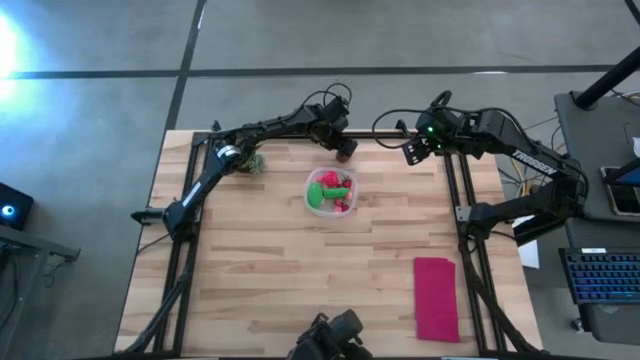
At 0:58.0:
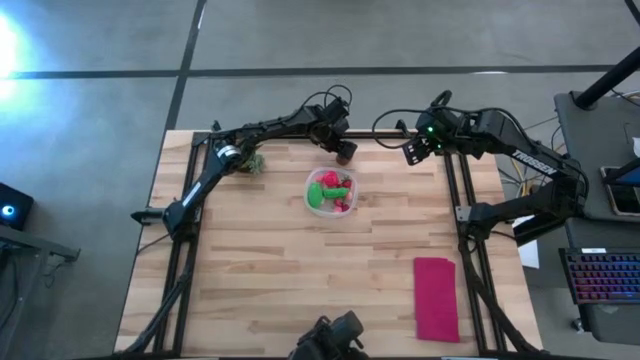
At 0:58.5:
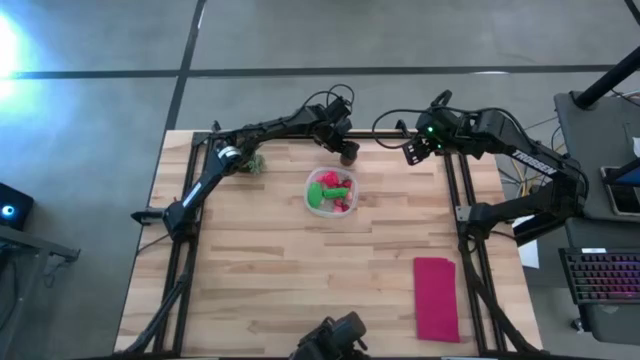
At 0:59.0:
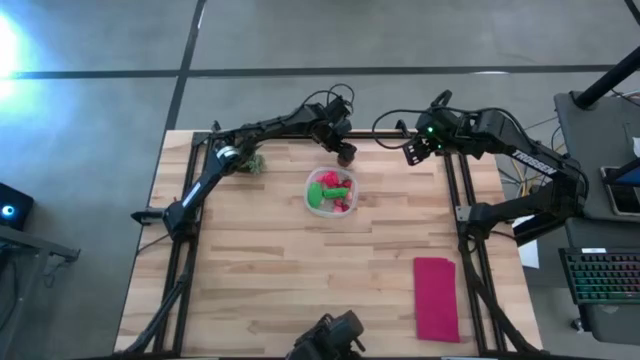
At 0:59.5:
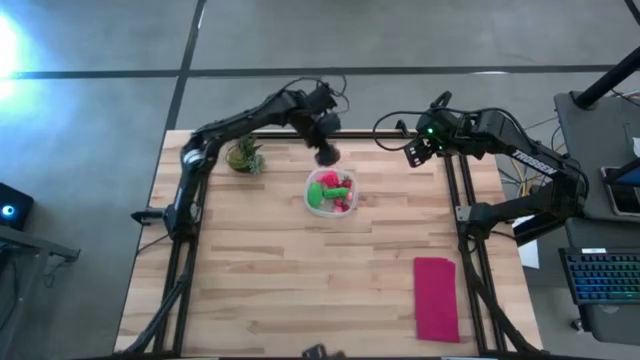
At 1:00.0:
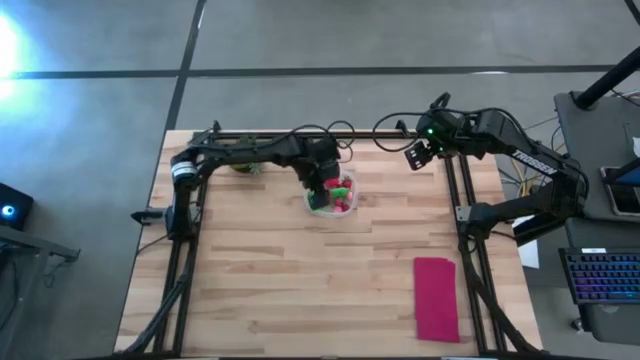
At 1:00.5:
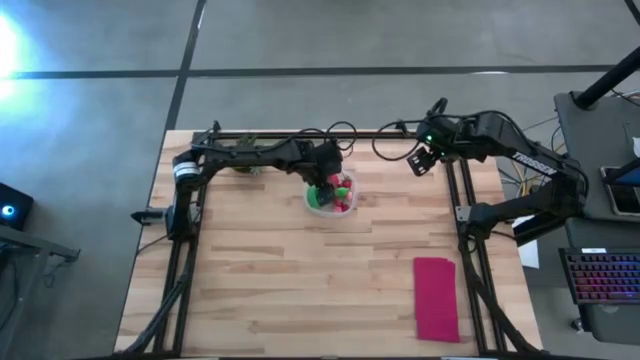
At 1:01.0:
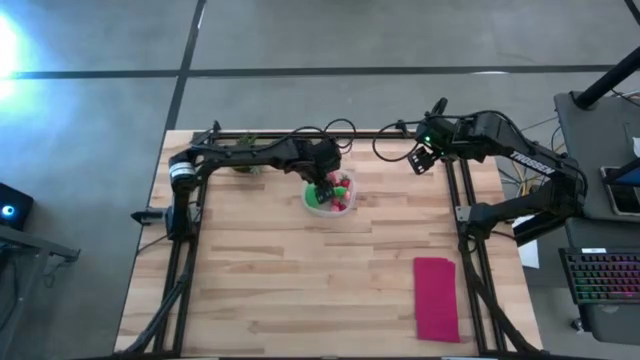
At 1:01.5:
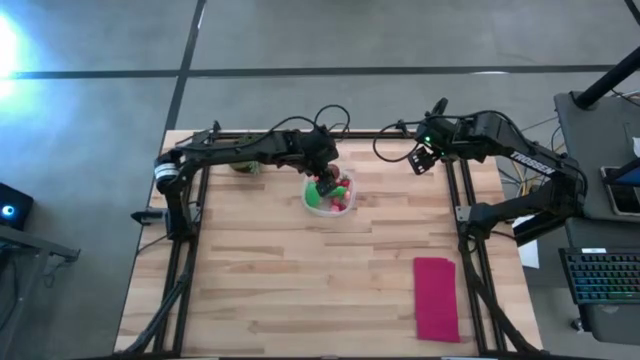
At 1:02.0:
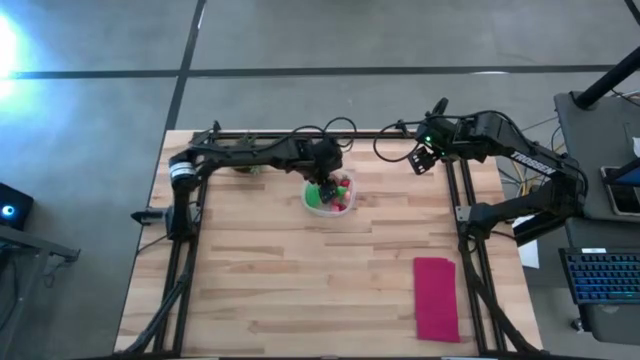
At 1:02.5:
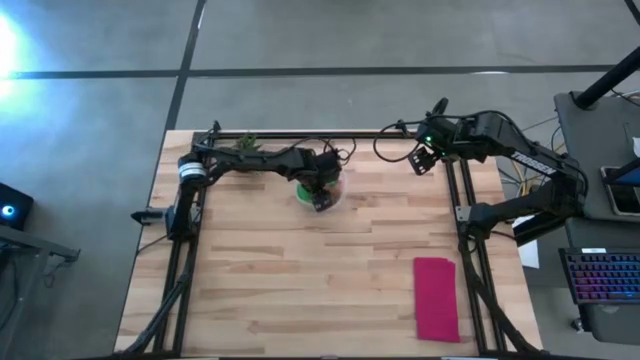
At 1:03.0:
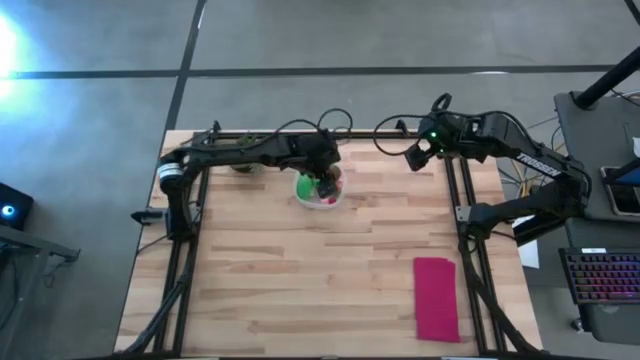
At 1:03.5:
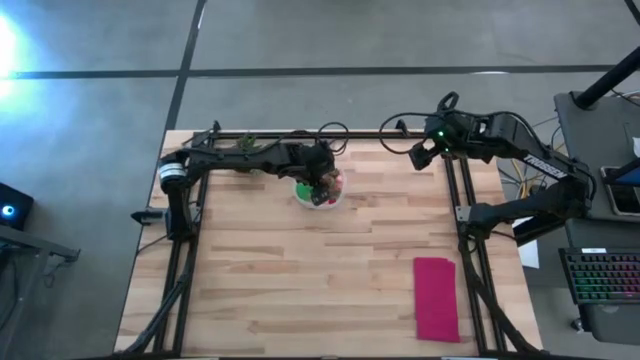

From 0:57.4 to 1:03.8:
Task: Pick and placing Produce into tupperware
Put the kiwi into the transparent bin

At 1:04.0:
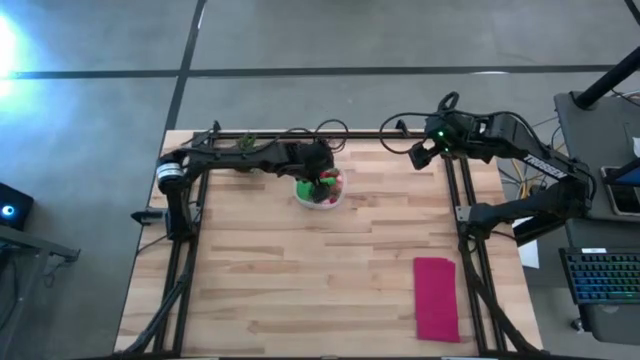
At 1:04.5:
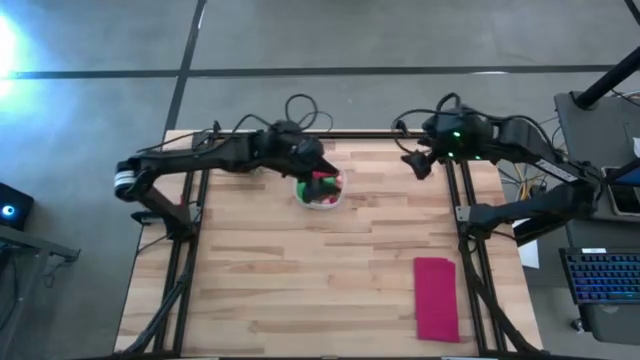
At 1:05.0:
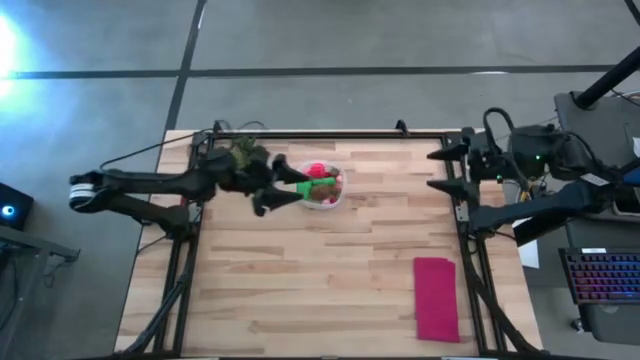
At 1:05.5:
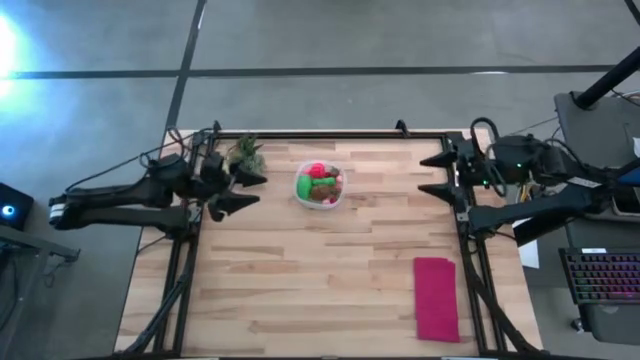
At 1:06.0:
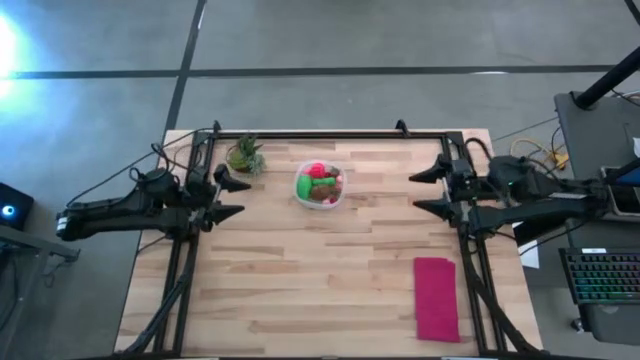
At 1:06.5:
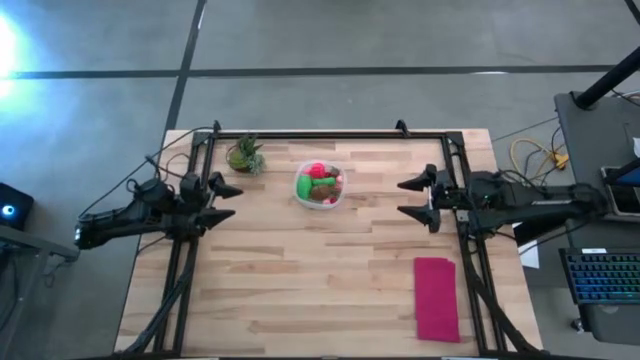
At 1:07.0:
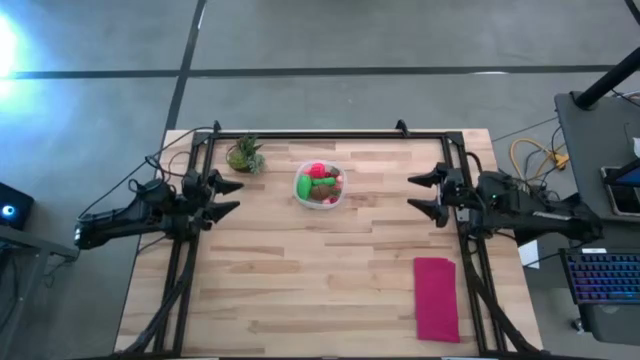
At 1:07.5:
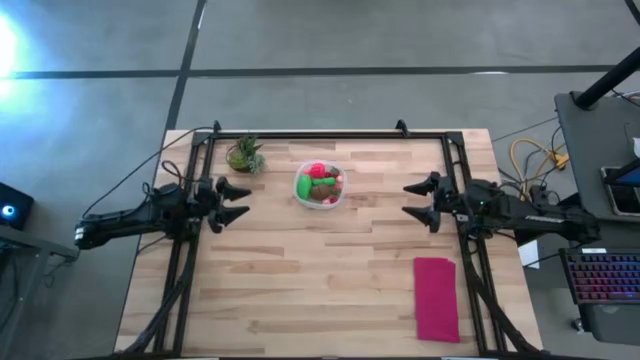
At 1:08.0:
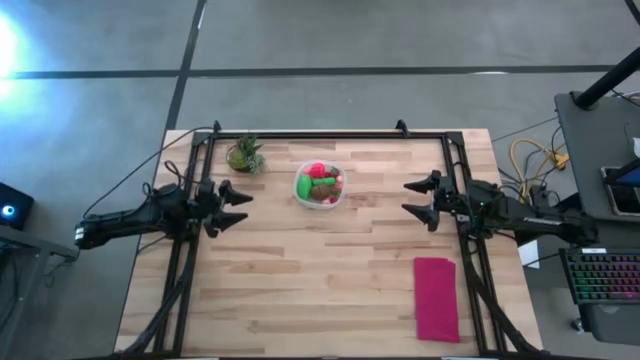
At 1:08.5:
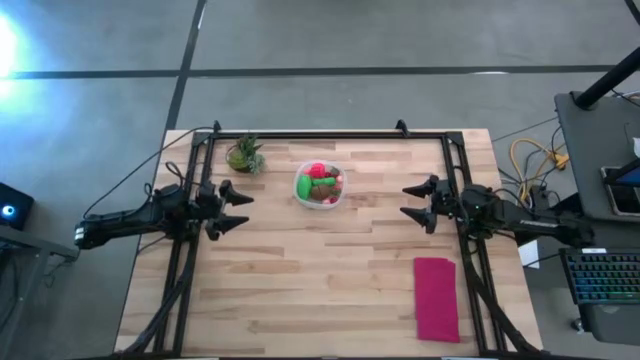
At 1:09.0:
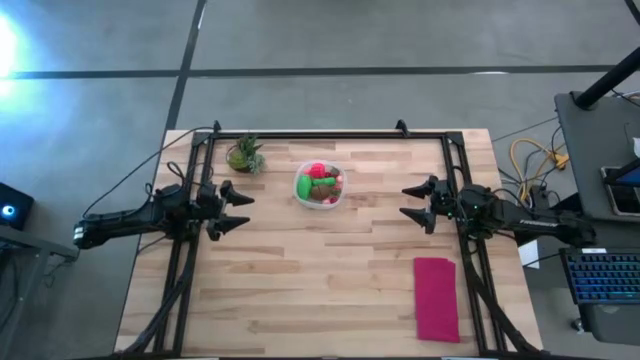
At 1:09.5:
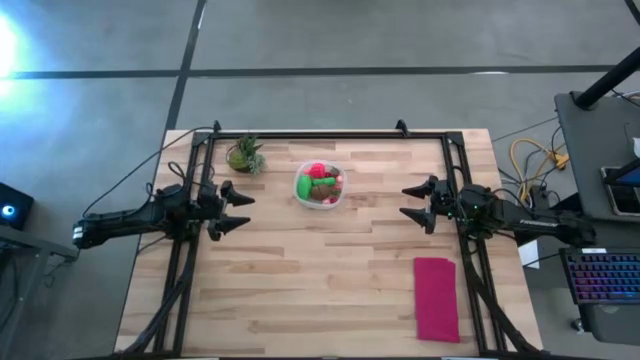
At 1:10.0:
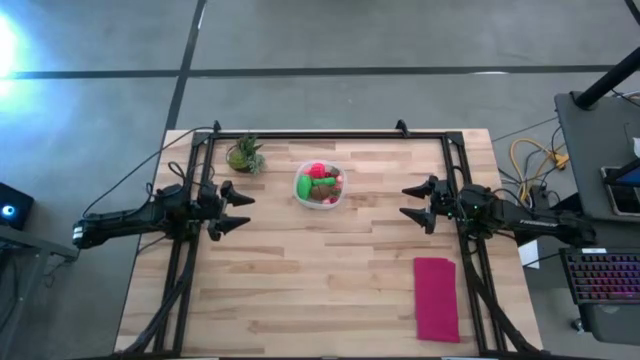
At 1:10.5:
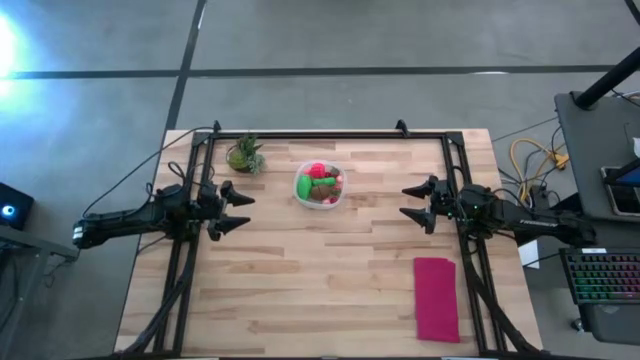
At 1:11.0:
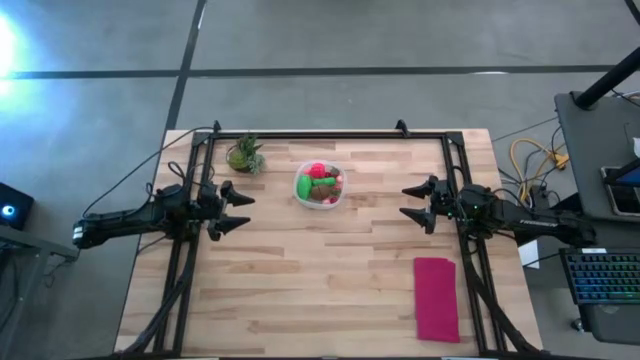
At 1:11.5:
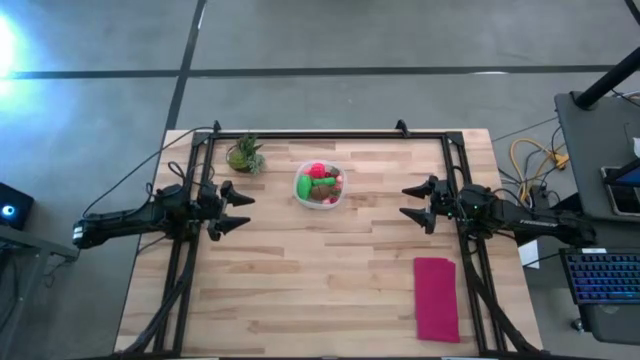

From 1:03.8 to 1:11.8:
Return to Home Position

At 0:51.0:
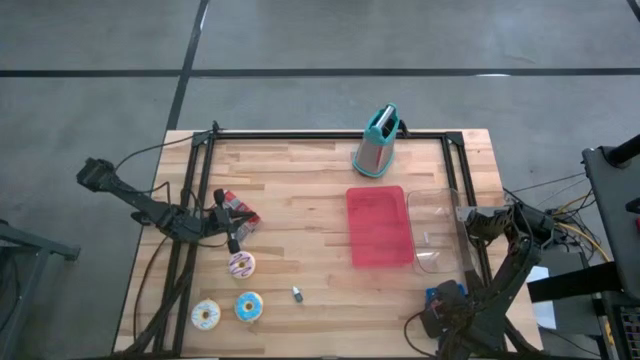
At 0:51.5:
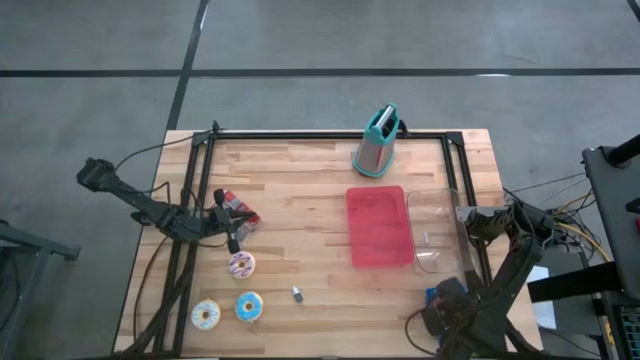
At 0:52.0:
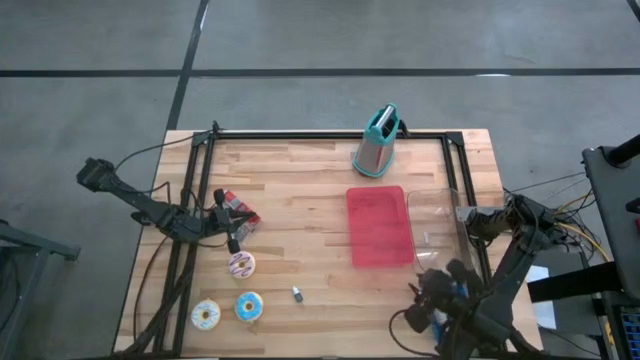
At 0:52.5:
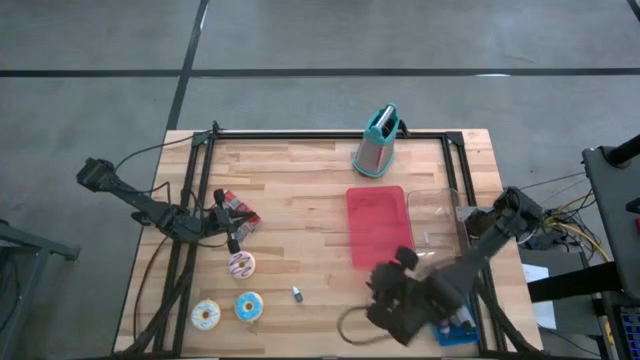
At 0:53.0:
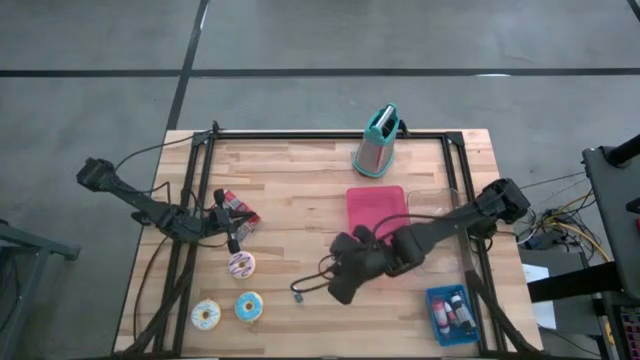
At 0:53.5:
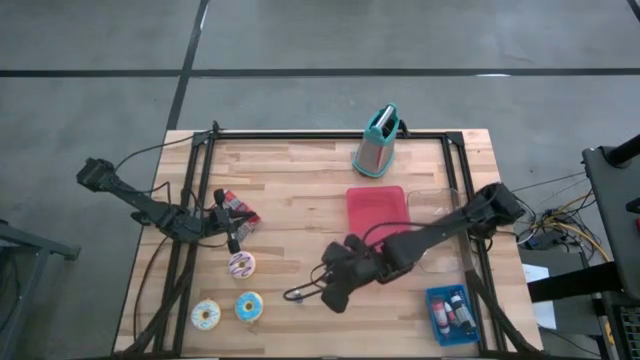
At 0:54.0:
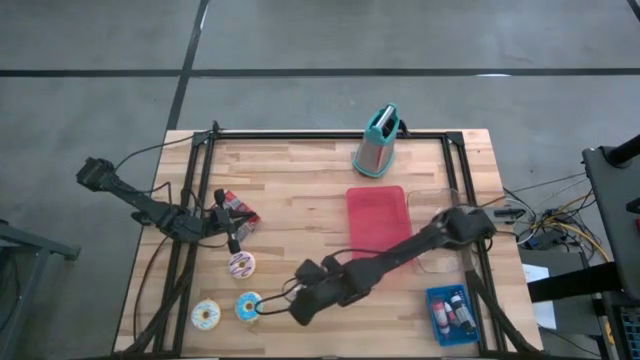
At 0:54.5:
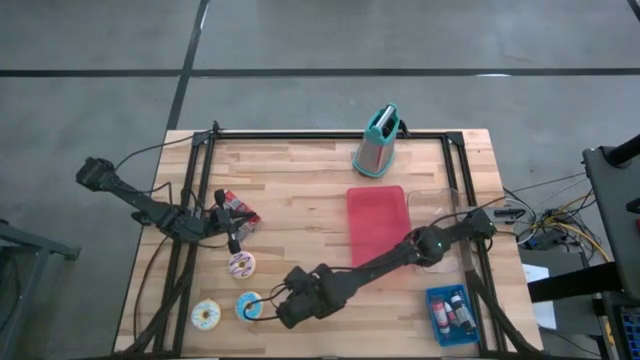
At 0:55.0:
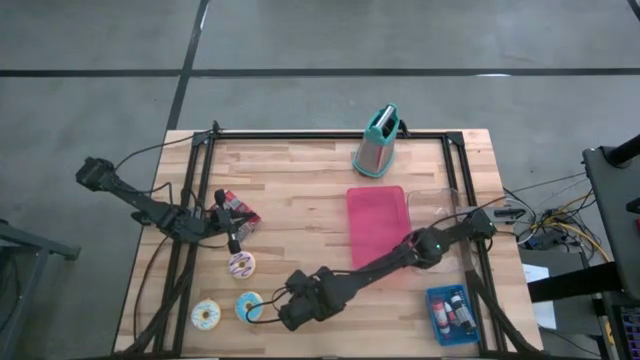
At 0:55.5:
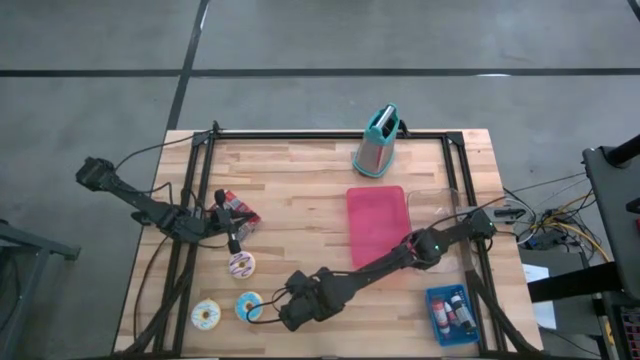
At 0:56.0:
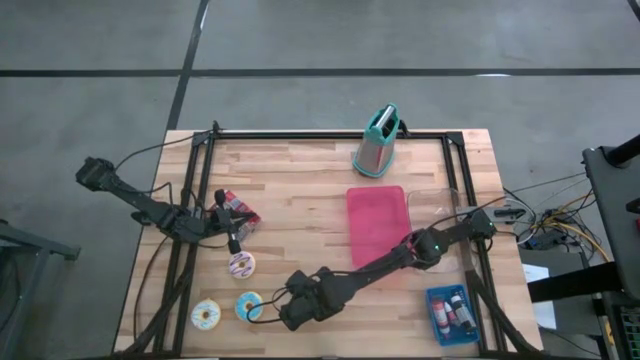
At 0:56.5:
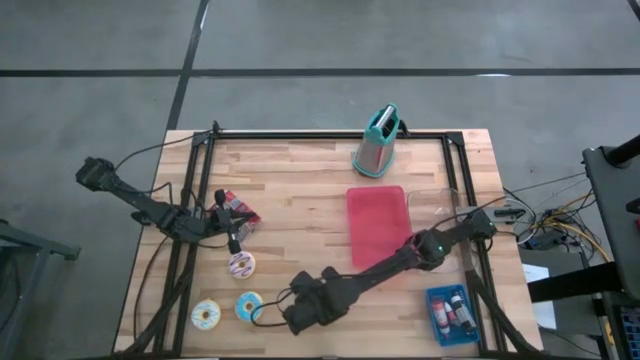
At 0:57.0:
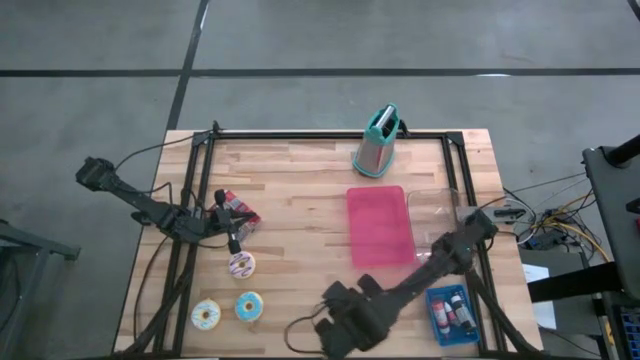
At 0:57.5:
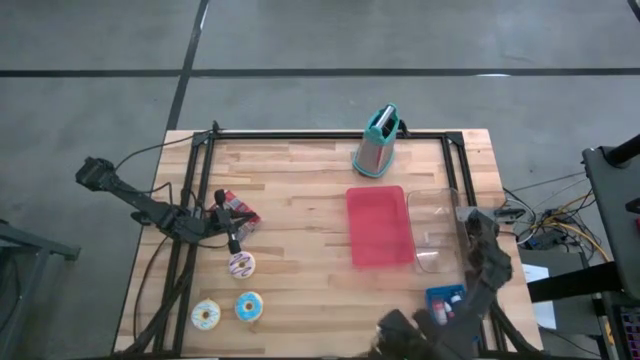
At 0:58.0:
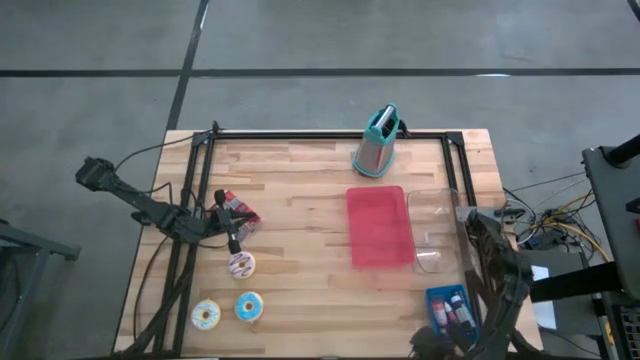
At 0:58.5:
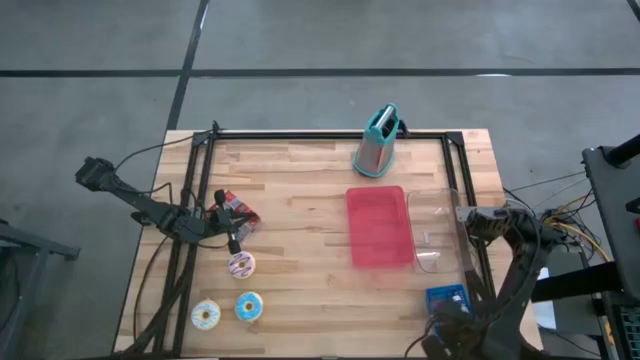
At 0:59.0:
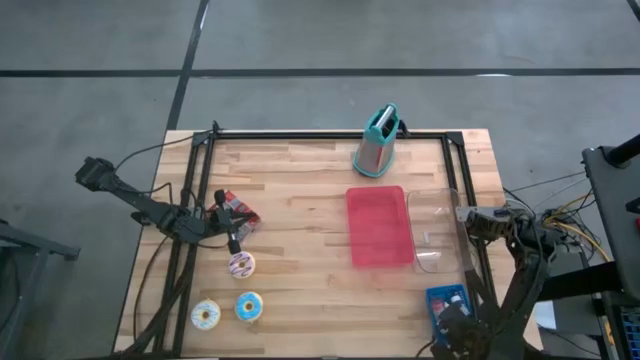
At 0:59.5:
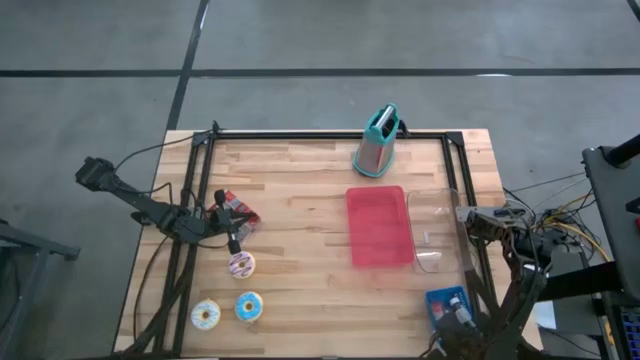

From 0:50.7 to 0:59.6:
Task: Pick & Place Food Item
Put the blue food coloring bottle into the blue bin
